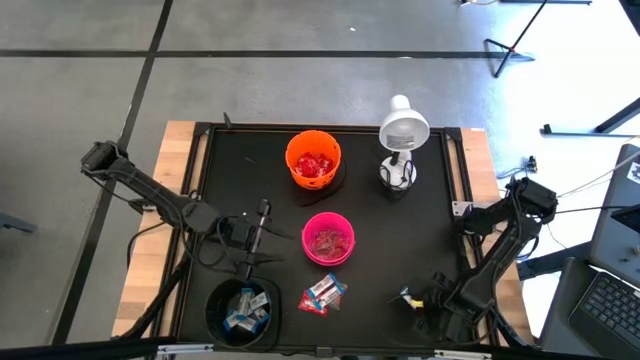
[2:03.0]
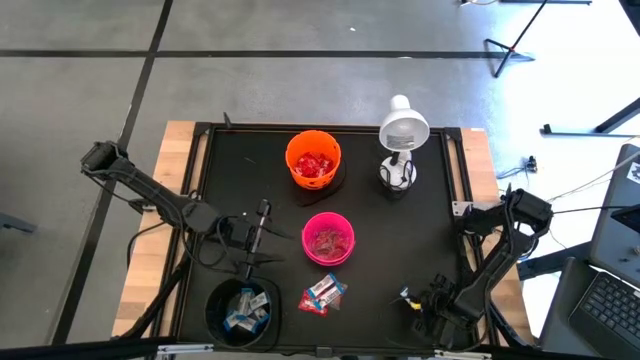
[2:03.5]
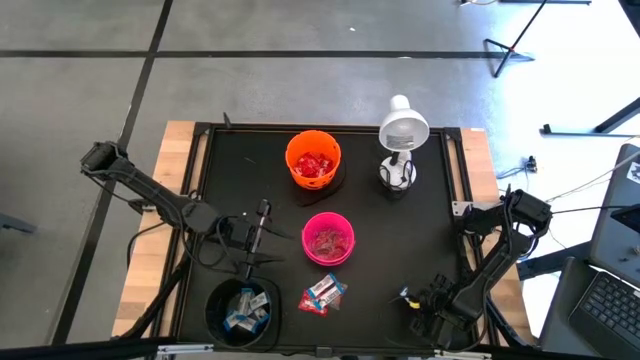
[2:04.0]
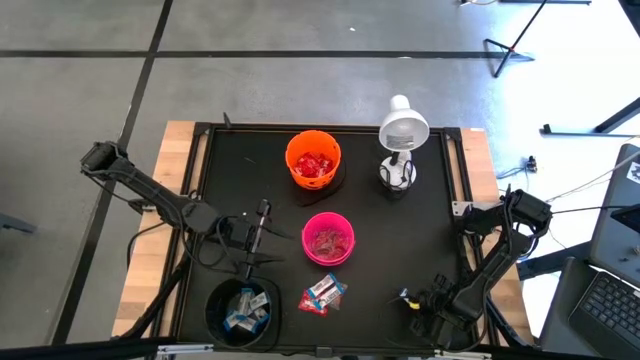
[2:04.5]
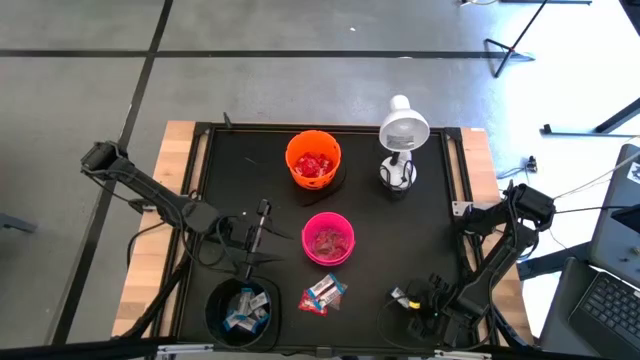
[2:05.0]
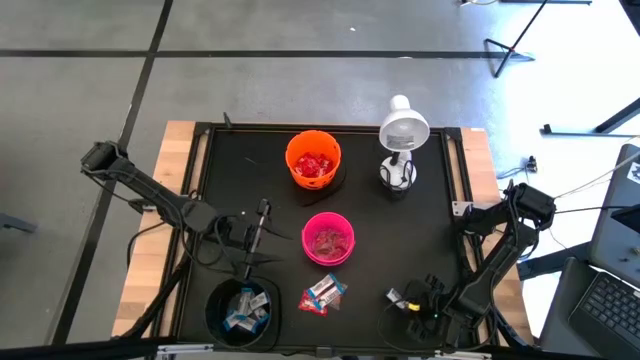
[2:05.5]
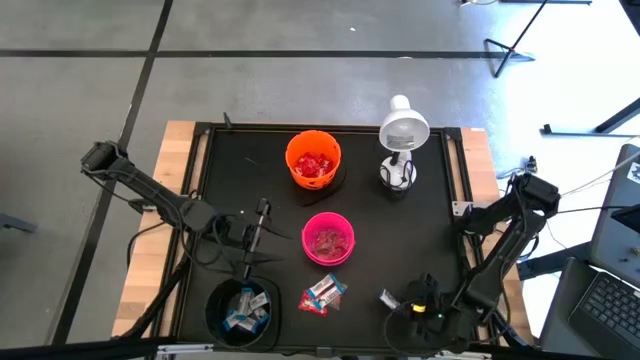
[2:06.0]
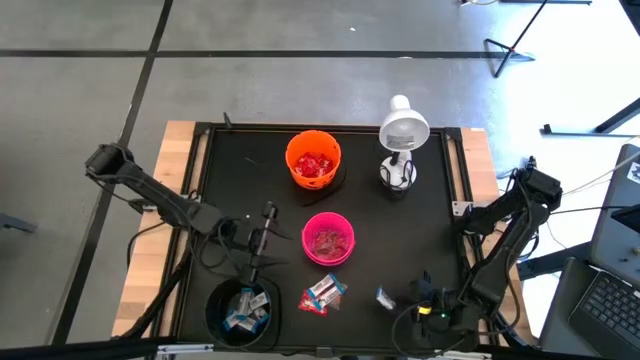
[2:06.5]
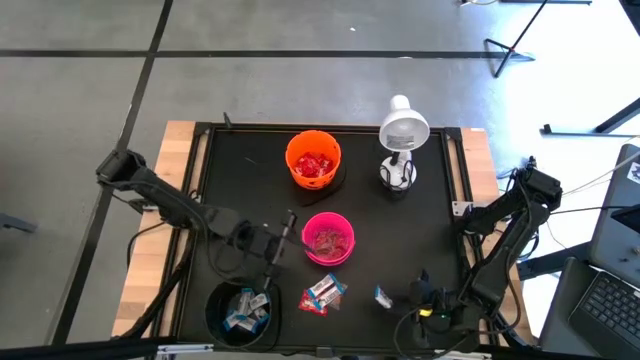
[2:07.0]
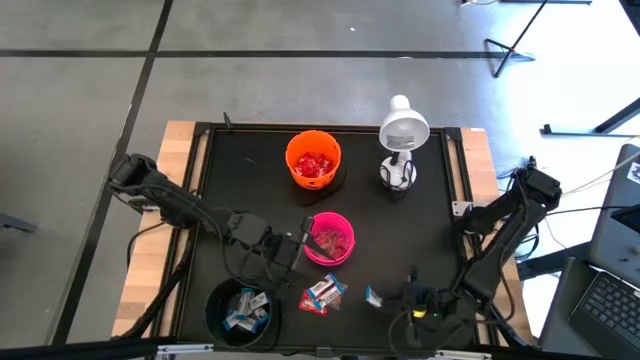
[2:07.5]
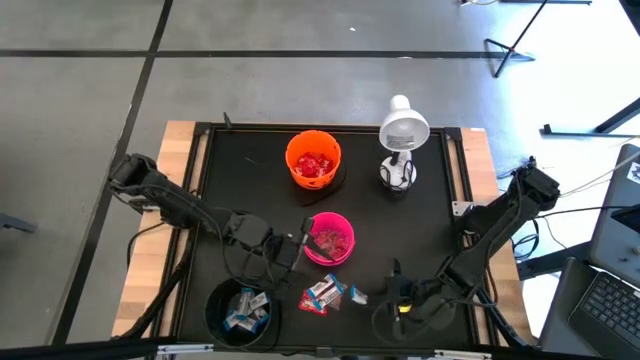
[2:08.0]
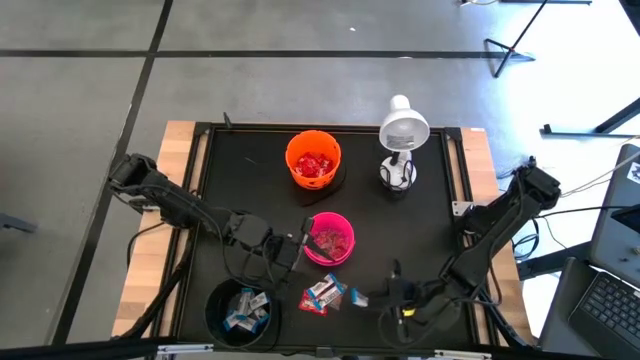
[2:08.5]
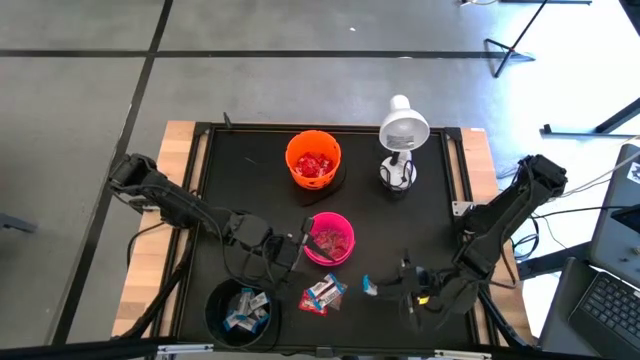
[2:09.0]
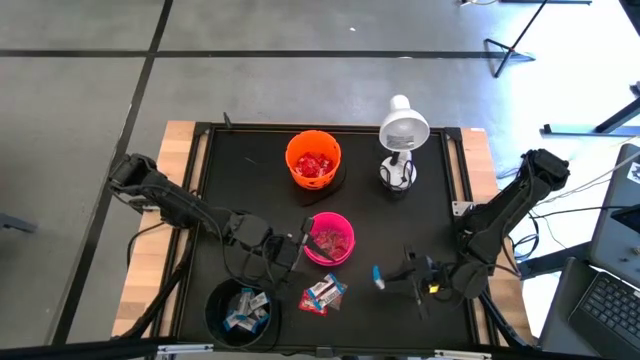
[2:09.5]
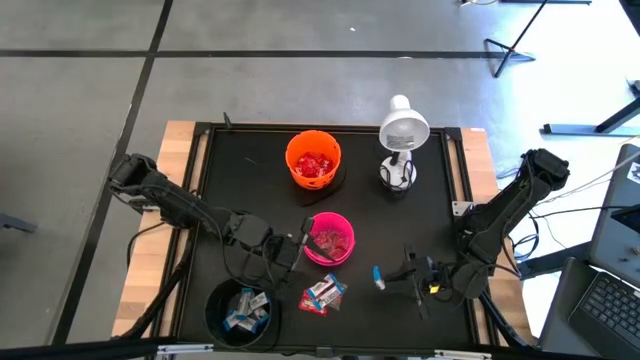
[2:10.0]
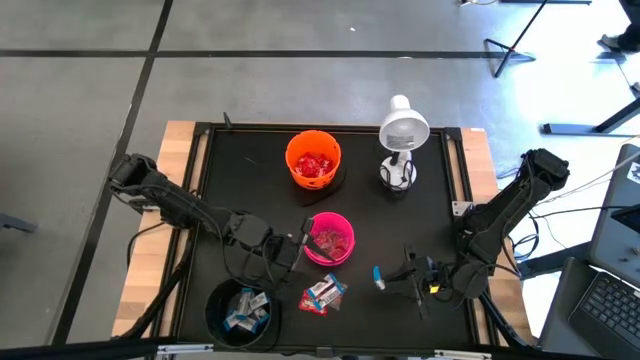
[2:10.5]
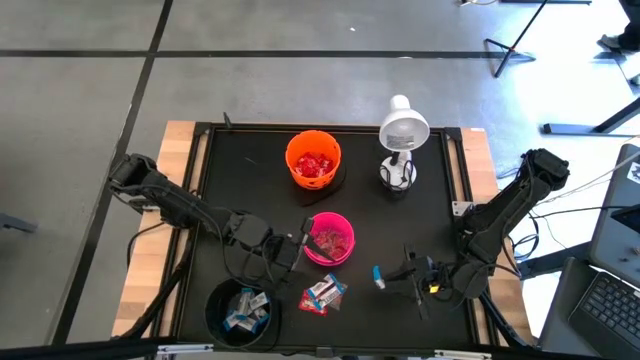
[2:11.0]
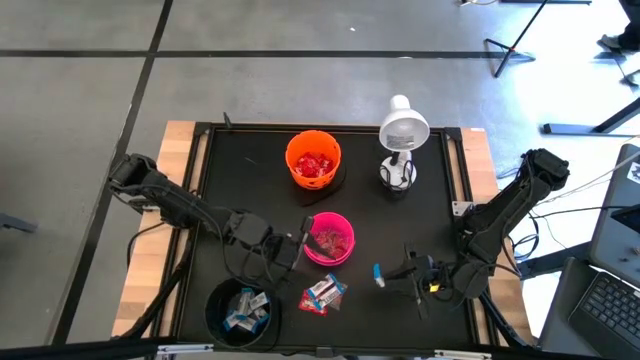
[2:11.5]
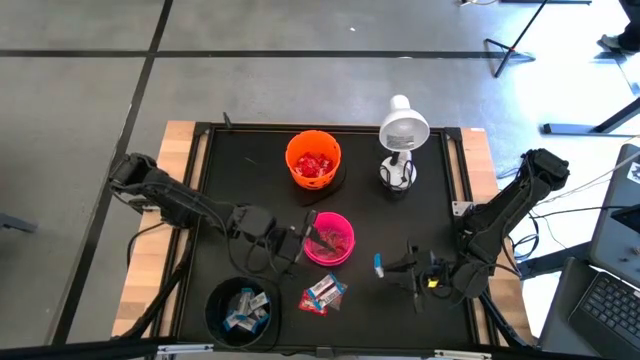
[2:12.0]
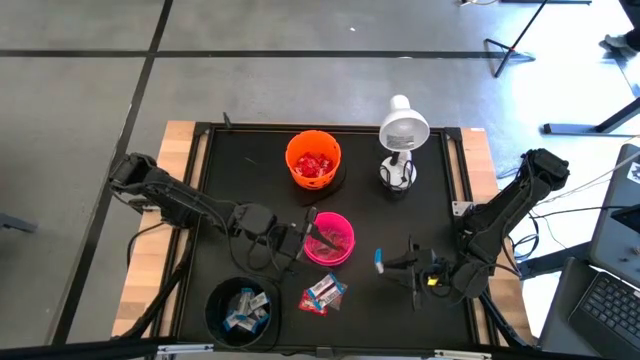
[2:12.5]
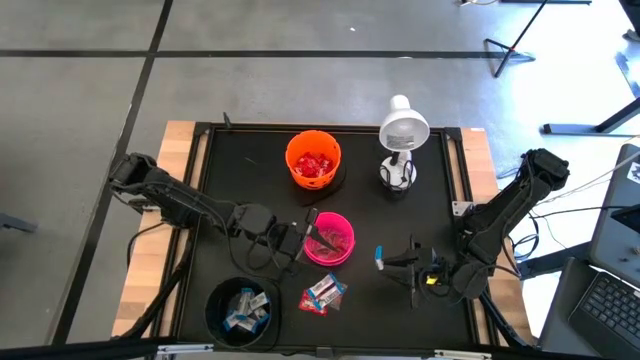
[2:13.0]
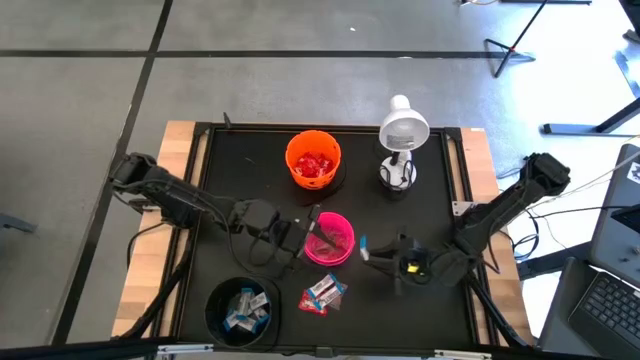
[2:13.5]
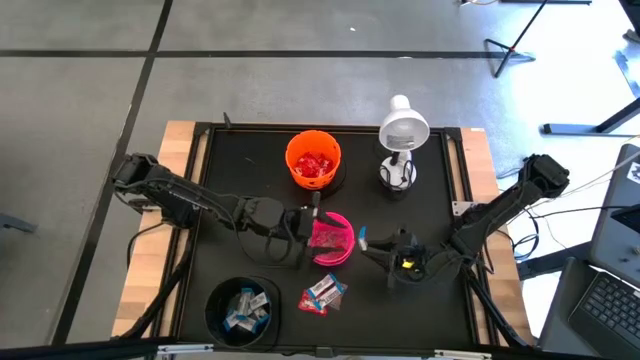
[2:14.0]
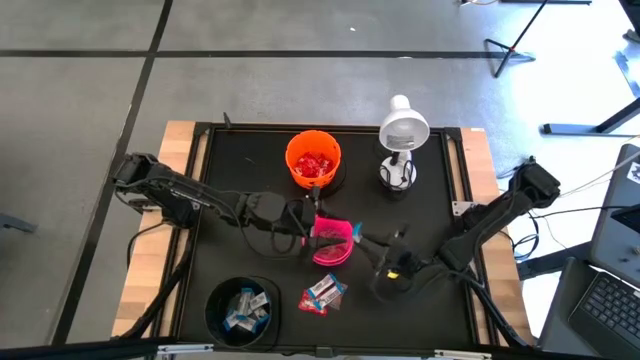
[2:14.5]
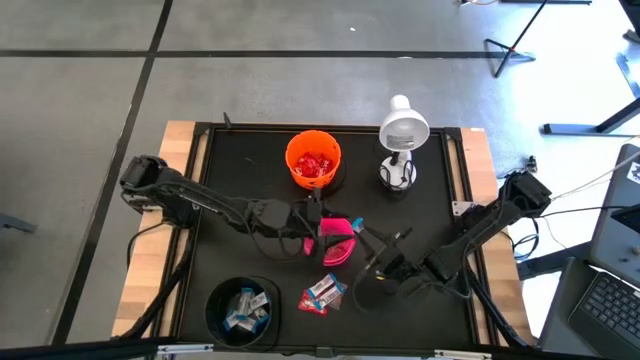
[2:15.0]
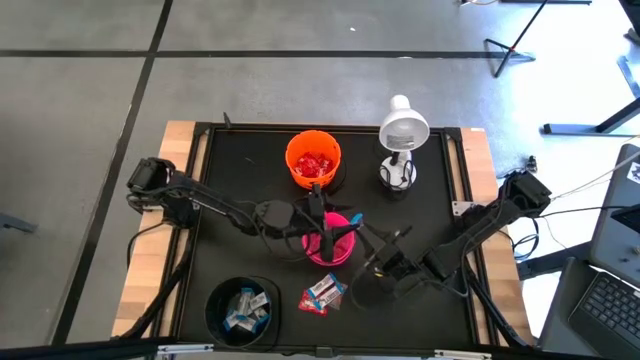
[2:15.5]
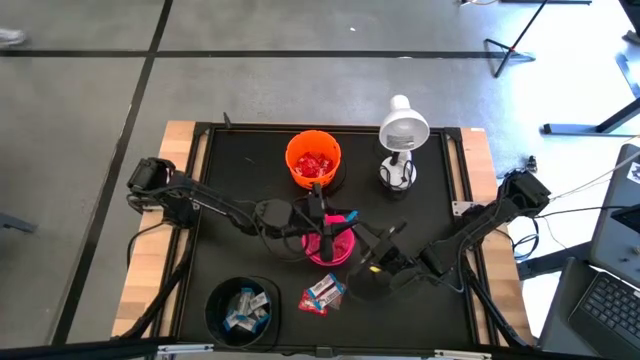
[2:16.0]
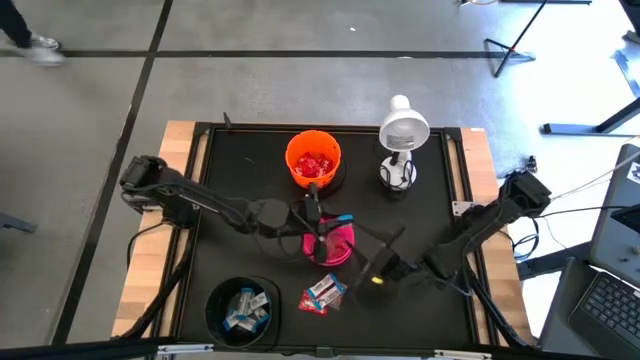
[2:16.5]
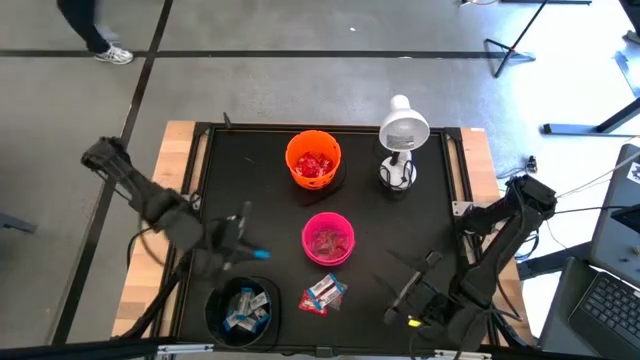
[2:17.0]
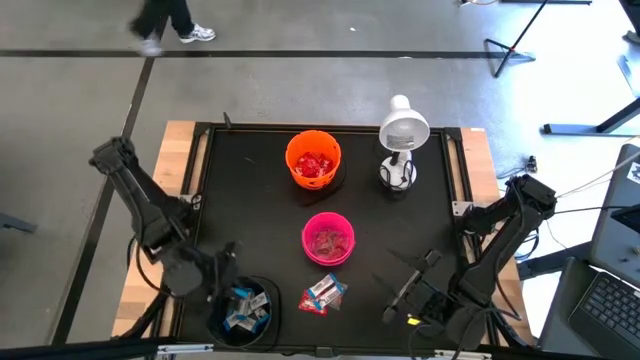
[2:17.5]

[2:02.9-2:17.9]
Task: Sort candy
Put the white chocolate into the black bucket

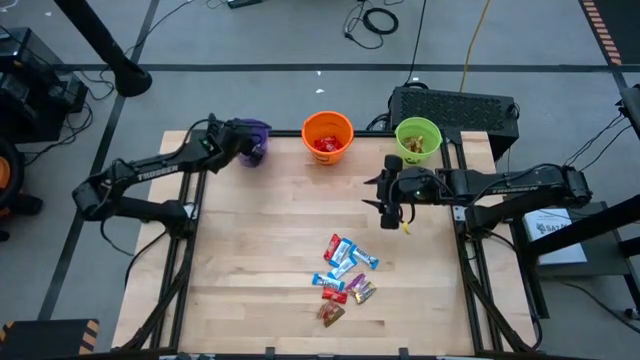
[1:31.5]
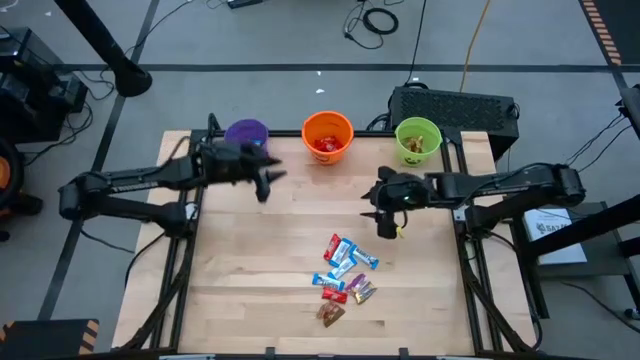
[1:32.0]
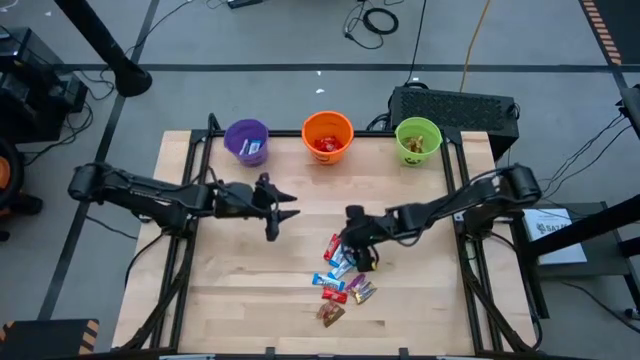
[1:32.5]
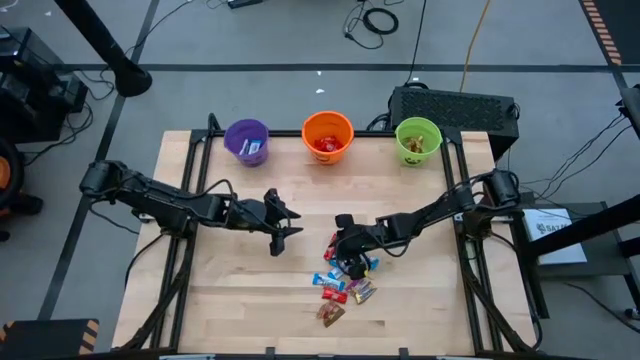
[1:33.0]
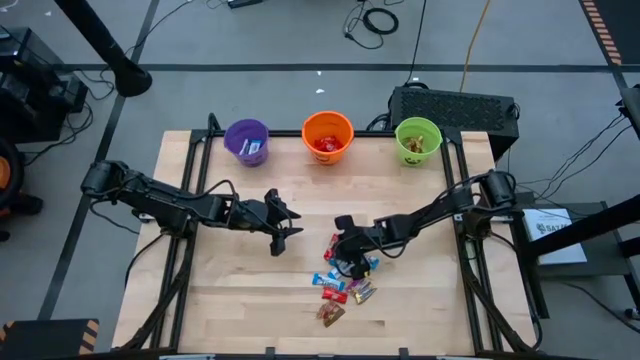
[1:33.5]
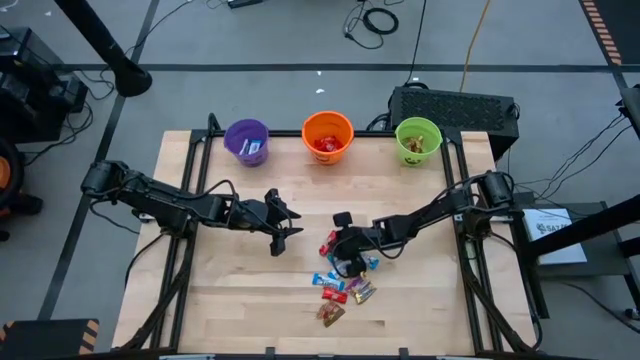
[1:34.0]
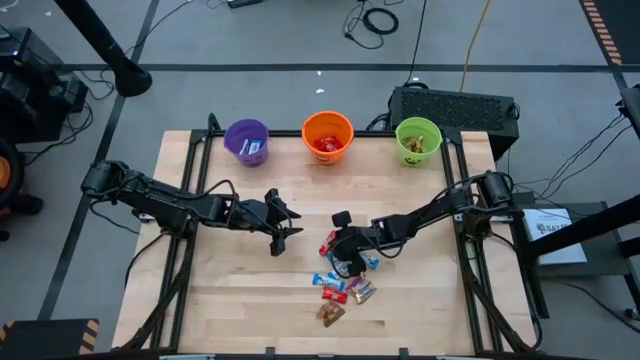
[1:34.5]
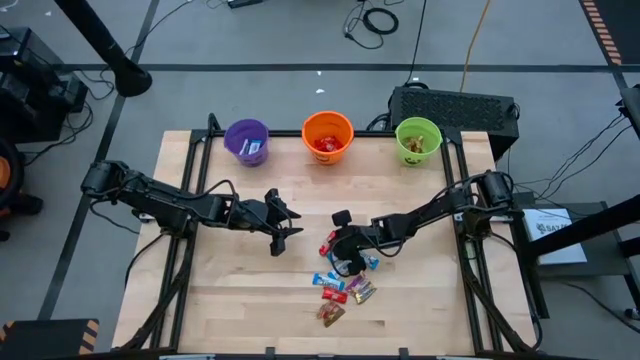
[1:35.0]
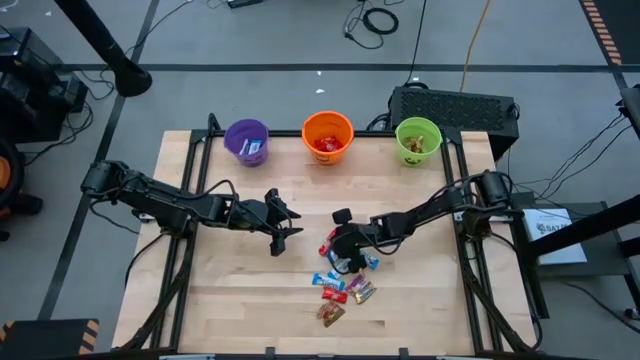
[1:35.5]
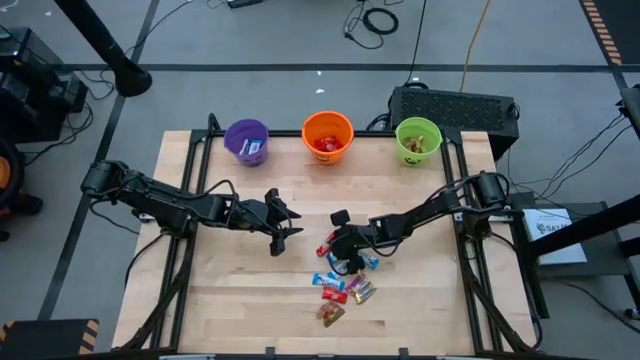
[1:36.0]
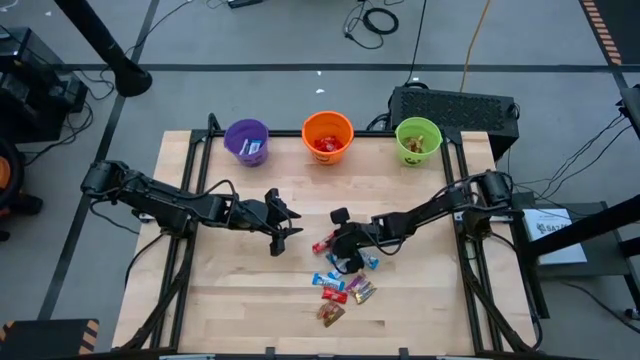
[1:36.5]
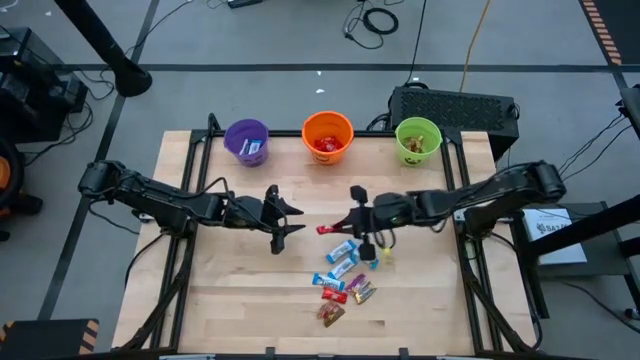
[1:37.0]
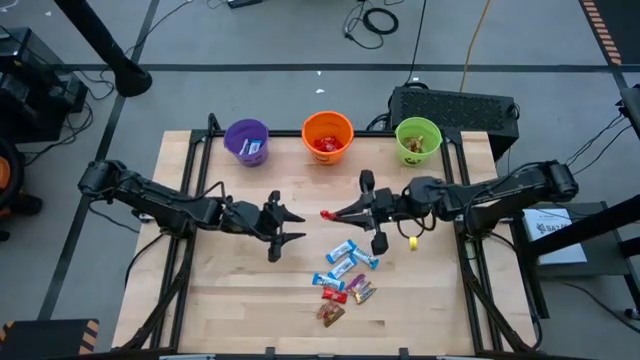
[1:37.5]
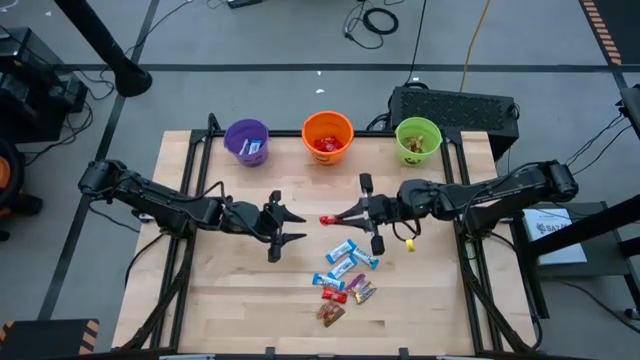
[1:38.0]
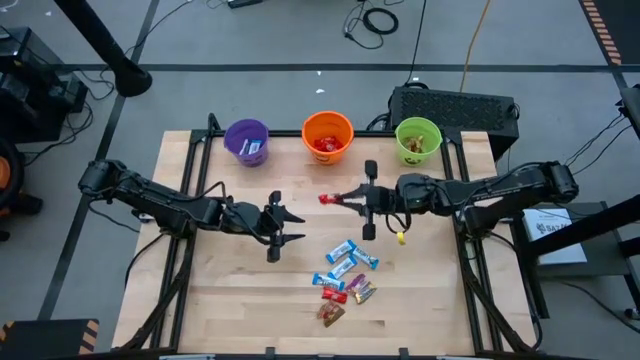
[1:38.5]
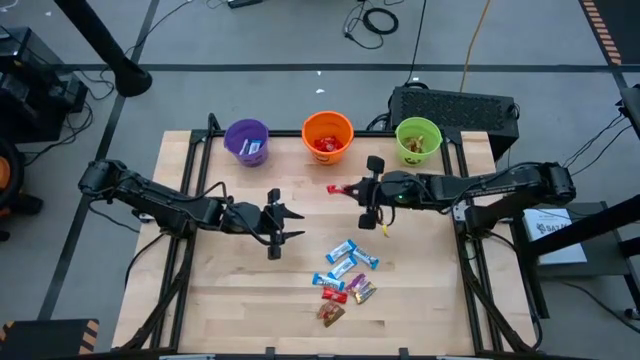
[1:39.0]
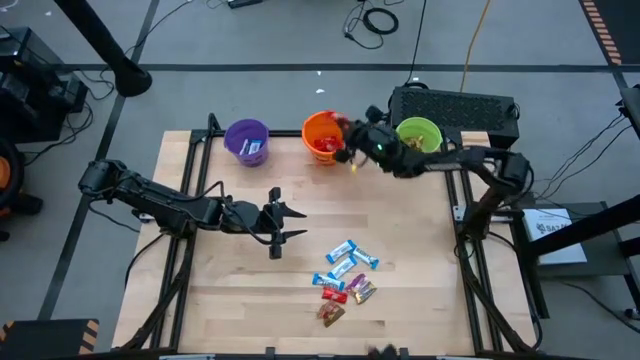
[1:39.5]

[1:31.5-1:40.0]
Task: Sort candy by brand, put in halloween buckets
Put the red chocolate into the orange bucket
